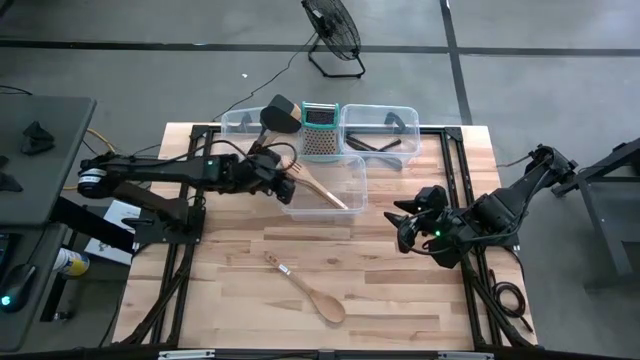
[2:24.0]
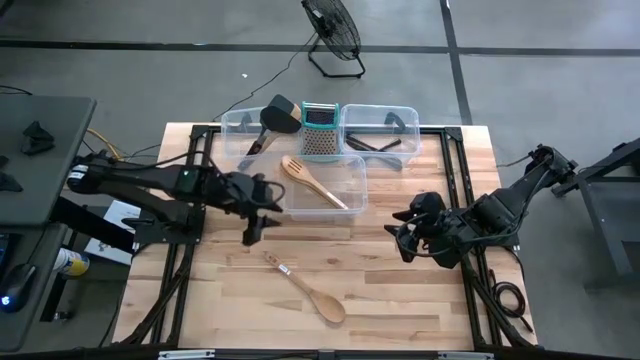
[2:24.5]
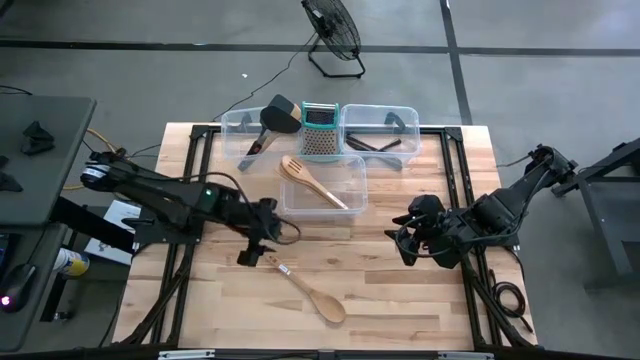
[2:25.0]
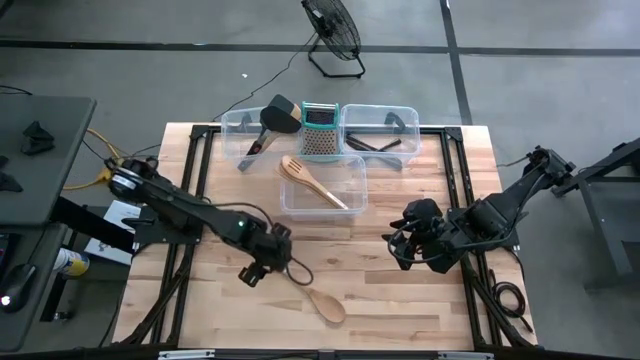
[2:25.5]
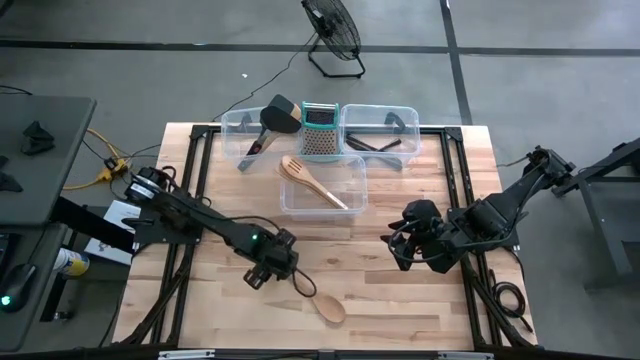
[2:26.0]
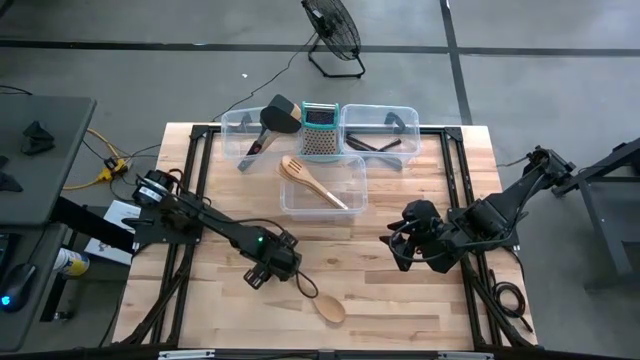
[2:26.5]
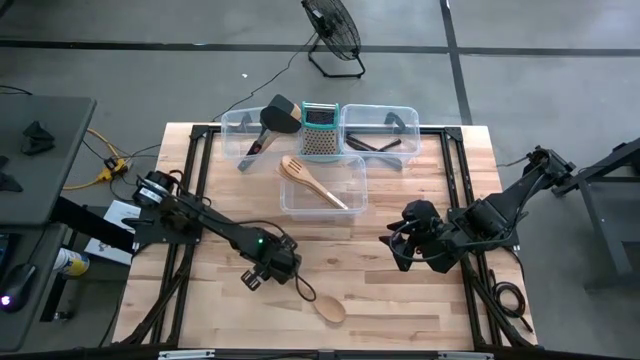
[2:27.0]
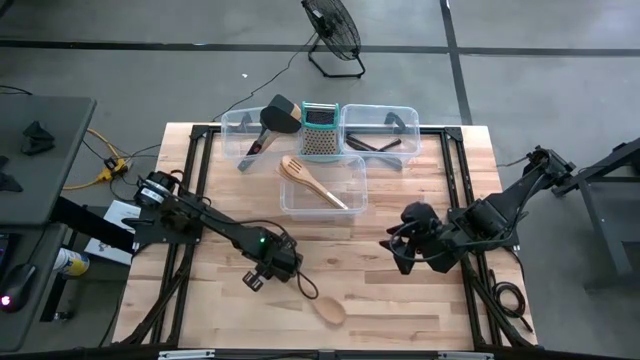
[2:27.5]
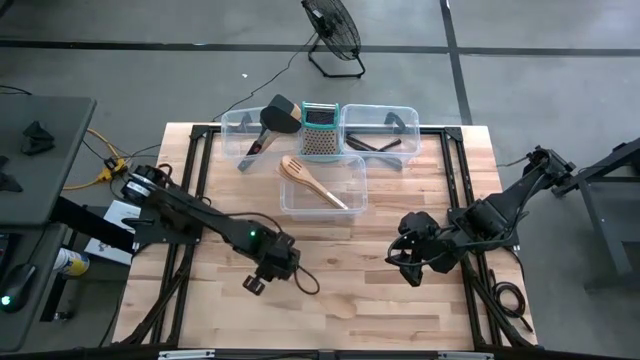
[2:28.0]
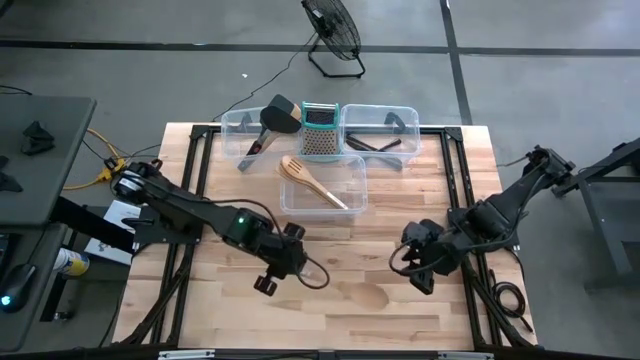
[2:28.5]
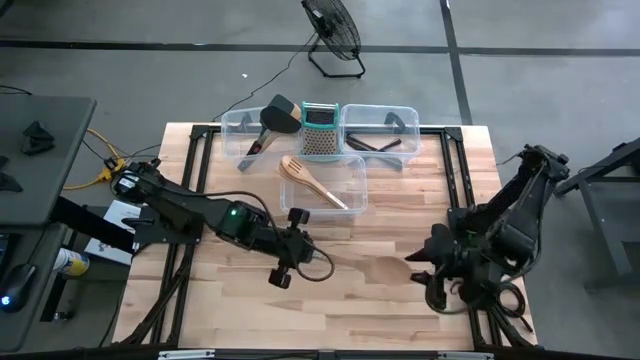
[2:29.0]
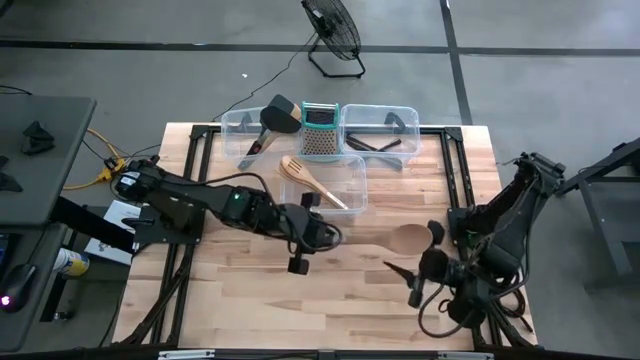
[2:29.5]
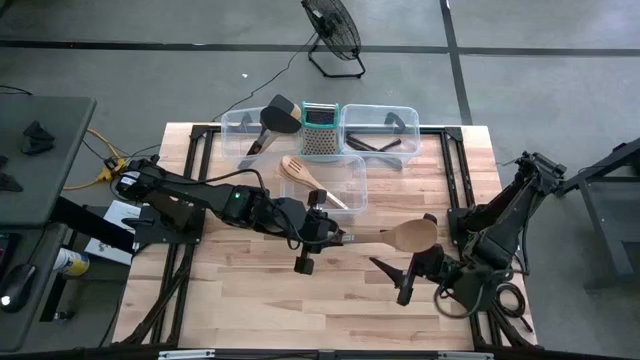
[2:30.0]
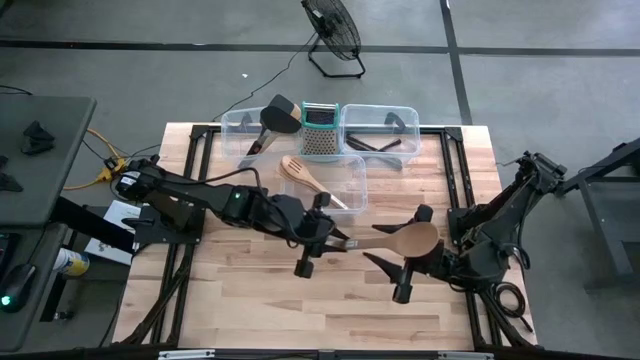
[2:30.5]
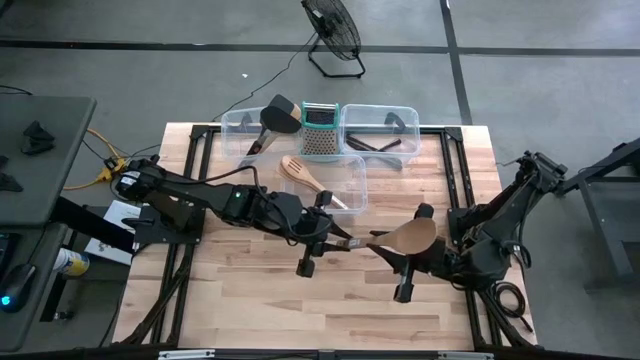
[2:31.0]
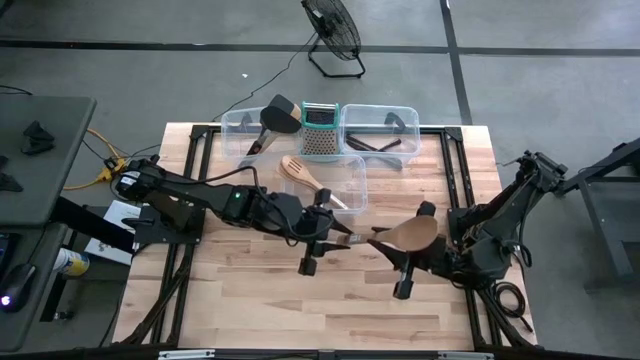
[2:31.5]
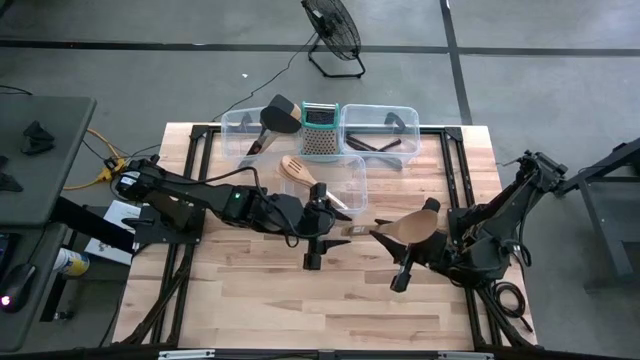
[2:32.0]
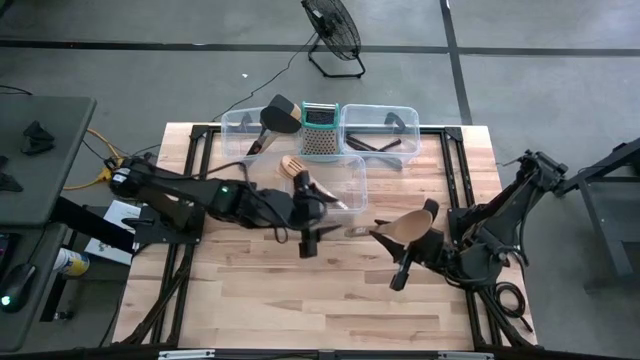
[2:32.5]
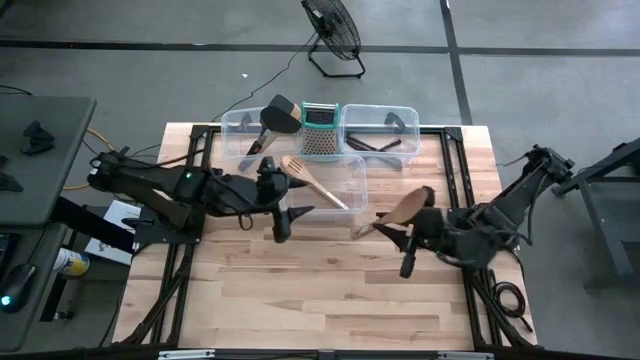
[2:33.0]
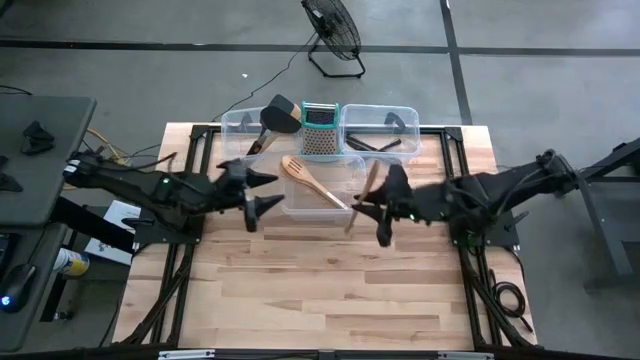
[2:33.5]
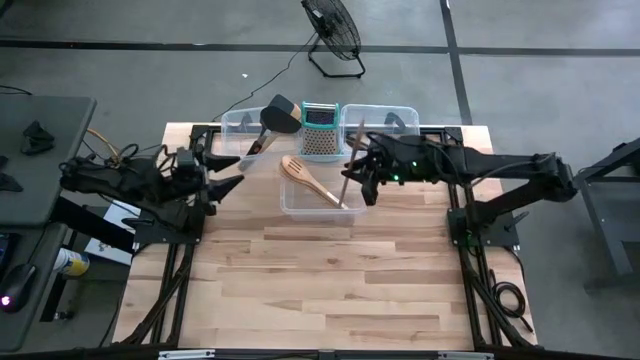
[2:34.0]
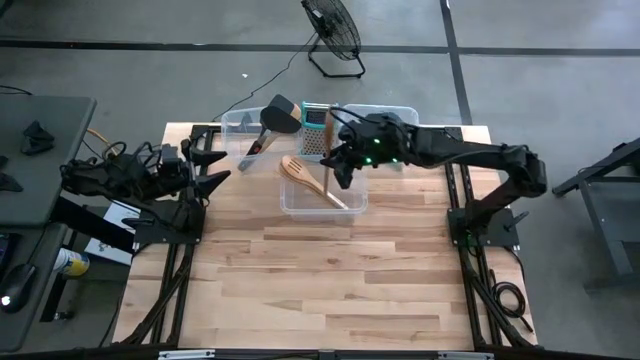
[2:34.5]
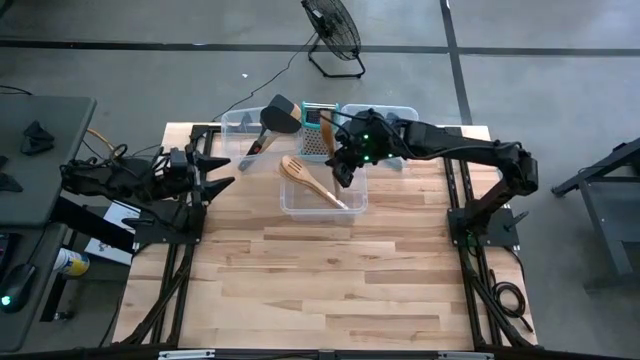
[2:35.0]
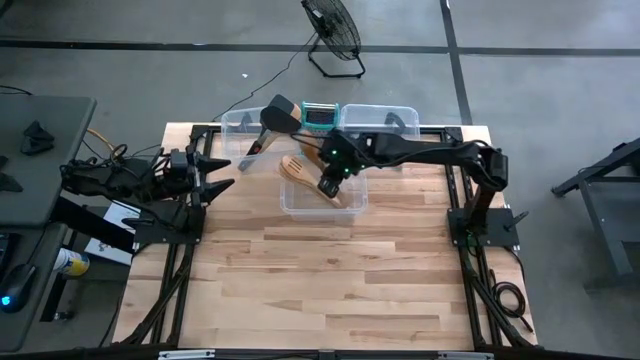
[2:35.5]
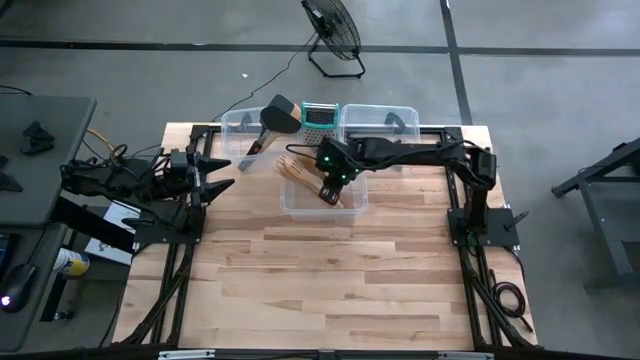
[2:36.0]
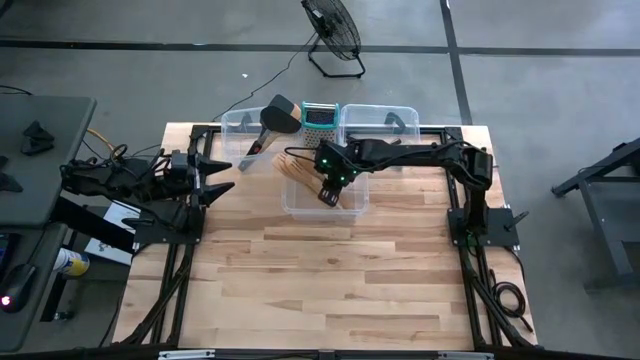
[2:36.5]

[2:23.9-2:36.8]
Task: Pick & Place Kitchen Items
Put the light brown serving spoon into the middle transparent bin

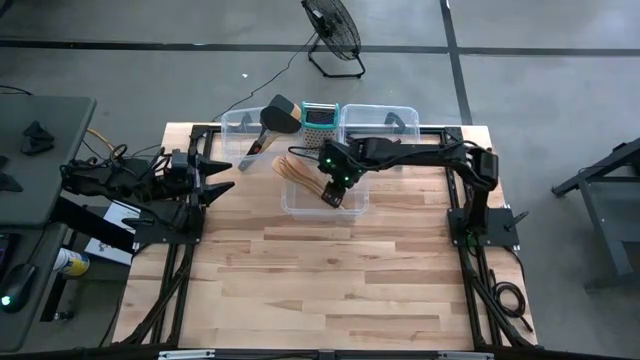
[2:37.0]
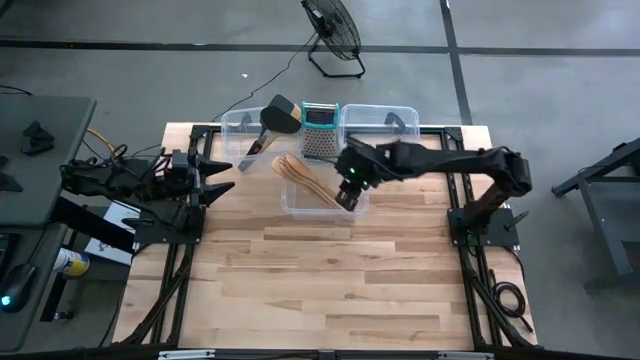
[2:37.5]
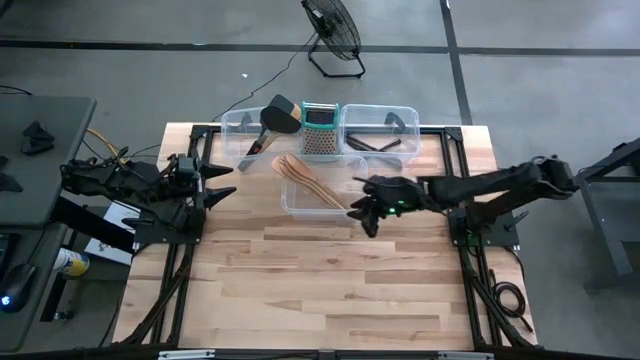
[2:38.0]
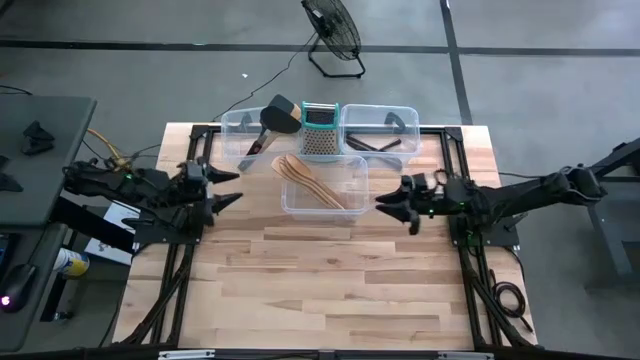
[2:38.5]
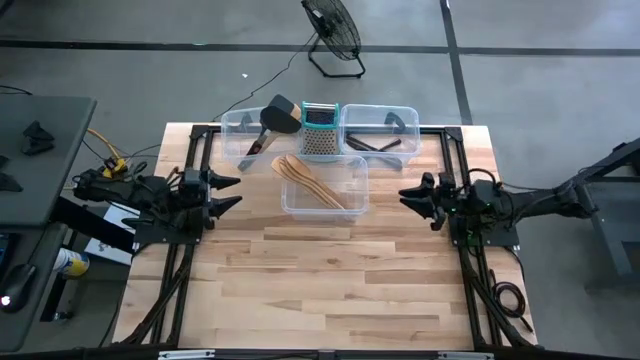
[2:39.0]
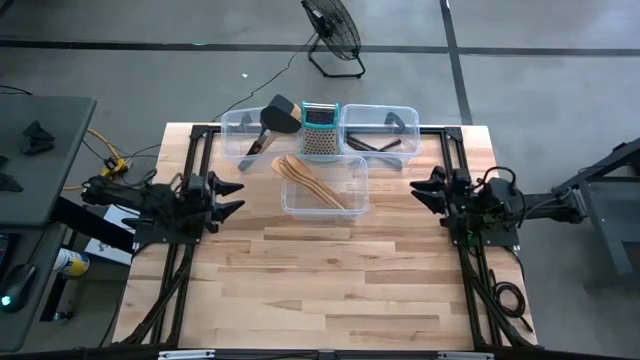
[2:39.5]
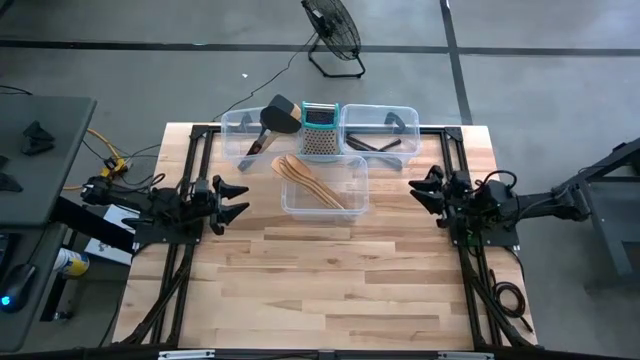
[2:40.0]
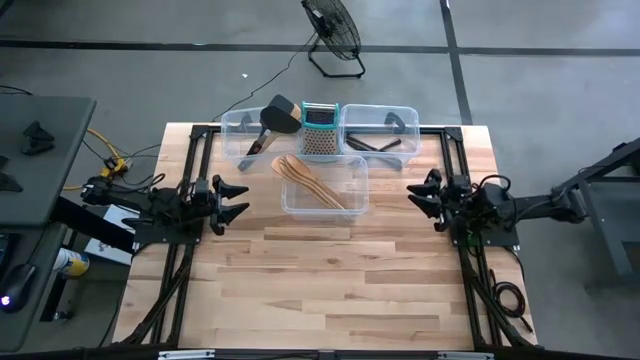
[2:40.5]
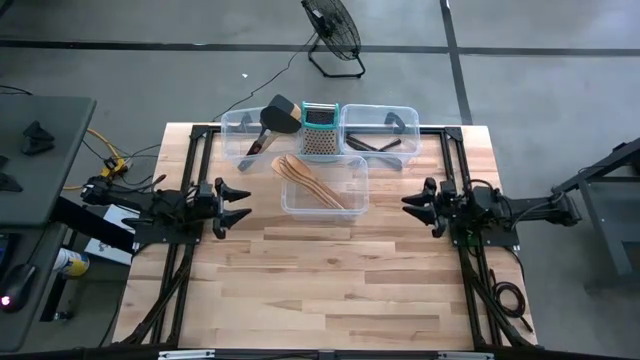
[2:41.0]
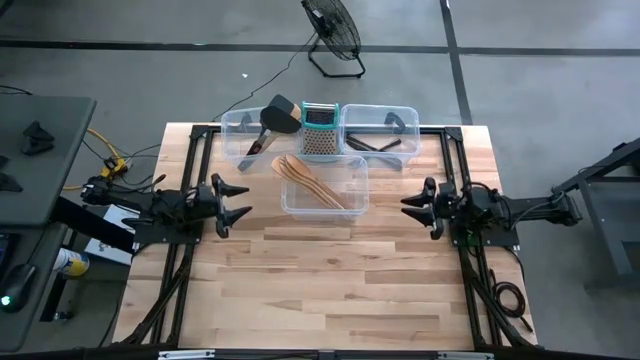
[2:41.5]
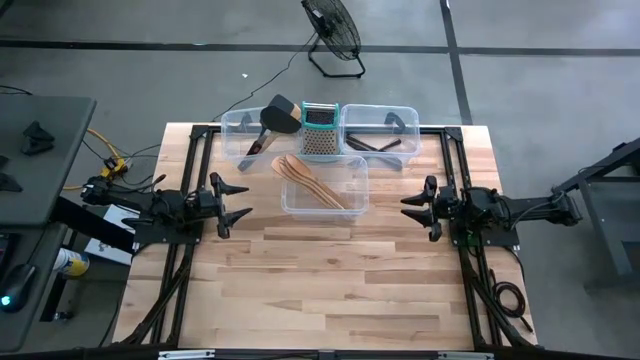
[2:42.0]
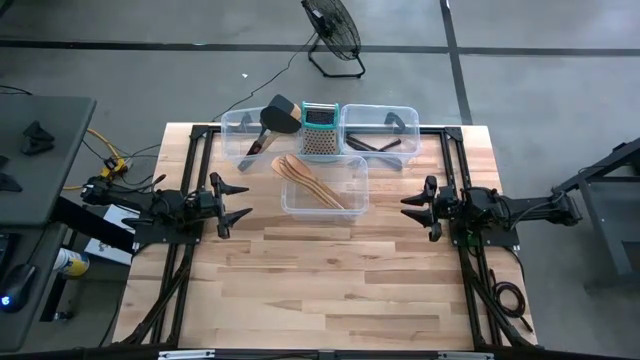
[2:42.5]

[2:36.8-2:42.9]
Return to Home Position

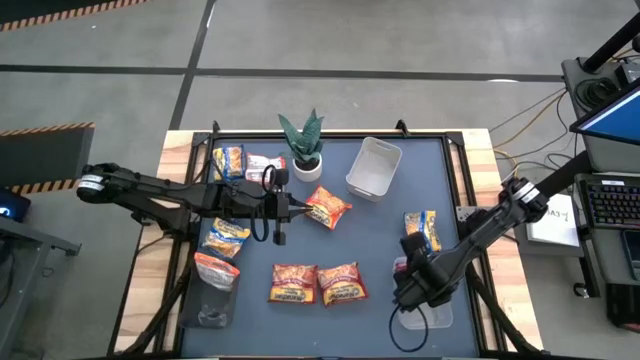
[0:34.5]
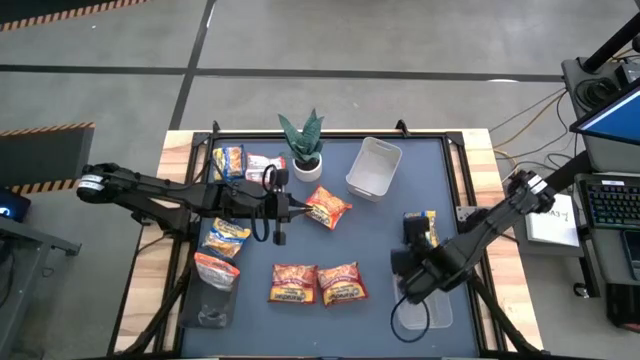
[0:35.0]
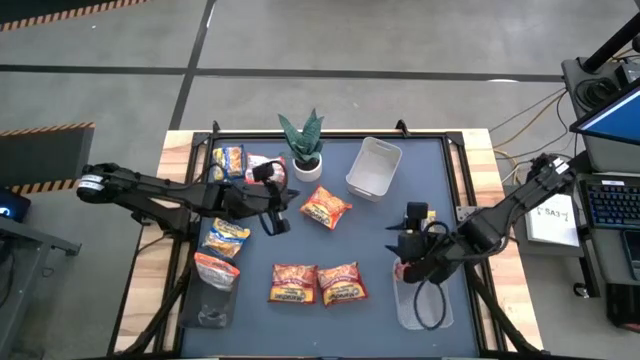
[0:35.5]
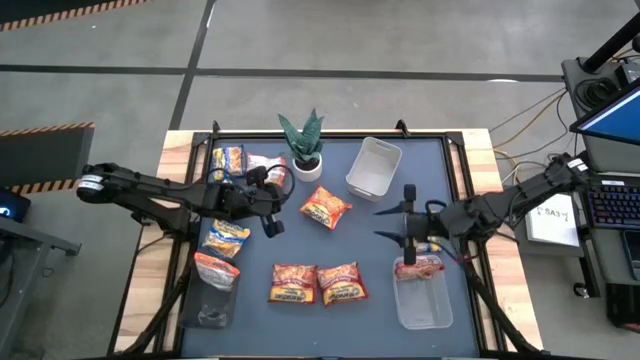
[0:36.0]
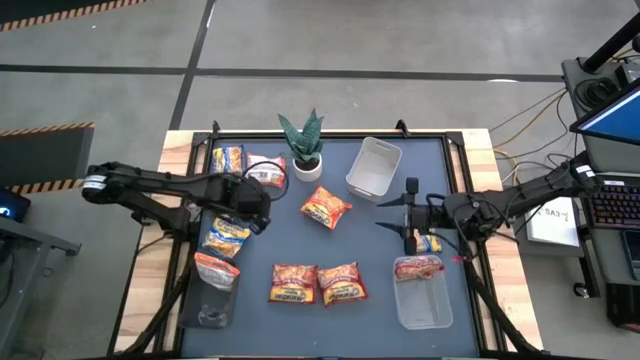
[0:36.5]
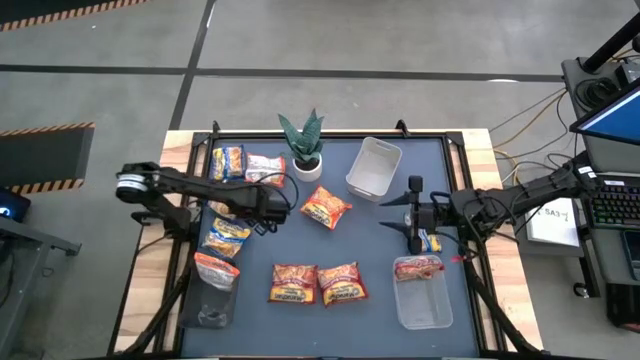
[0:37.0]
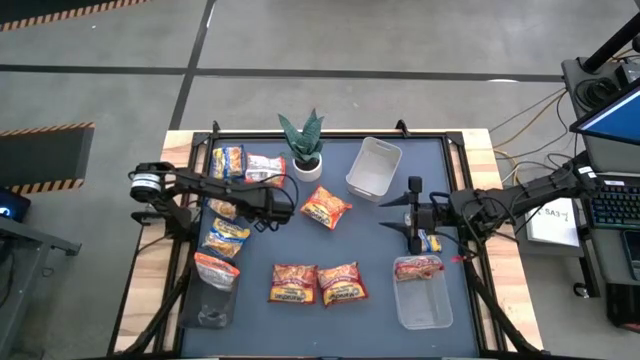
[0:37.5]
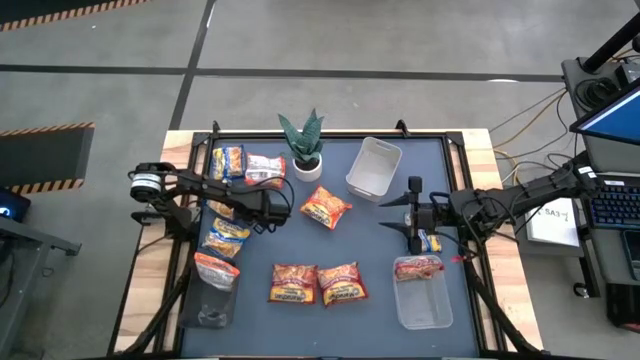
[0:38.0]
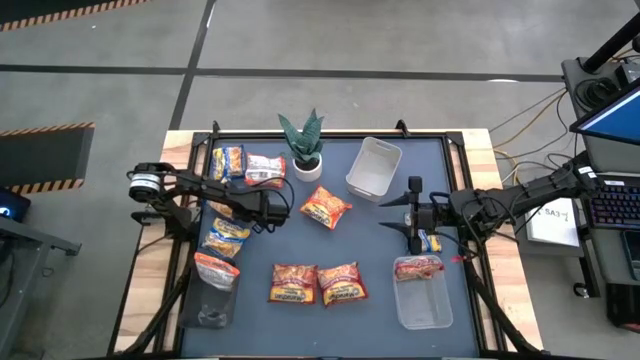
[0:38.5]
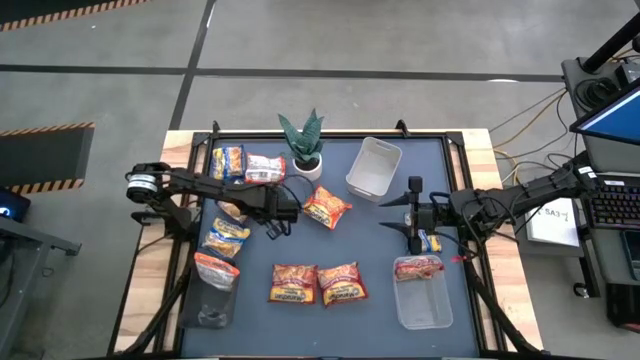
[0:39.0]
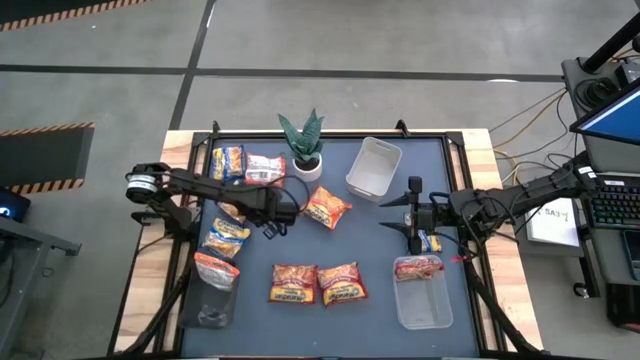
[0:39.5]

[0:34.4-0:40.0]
Task: Sort Maruchan noodles
Put the middle left blue instant noodle pack into the gray bin
